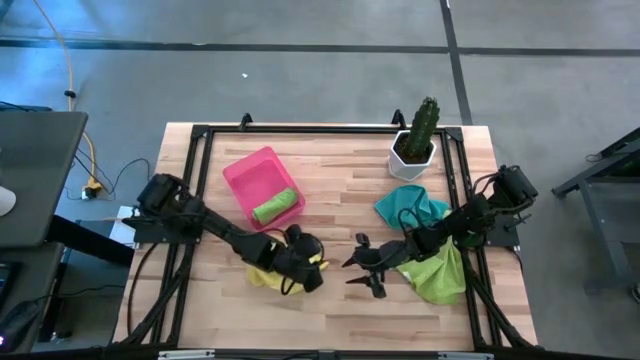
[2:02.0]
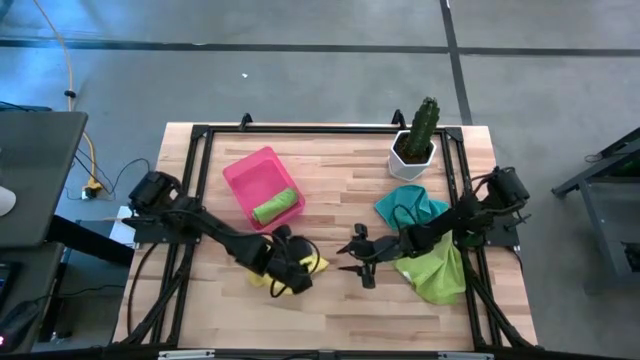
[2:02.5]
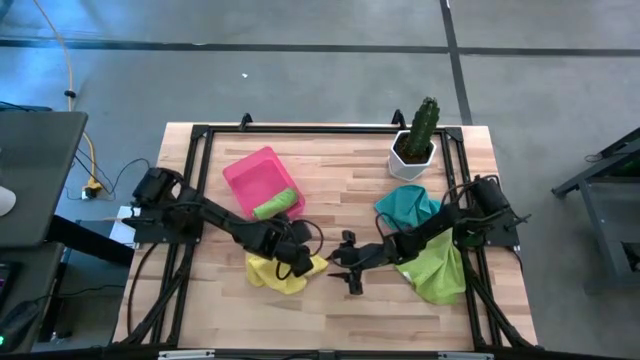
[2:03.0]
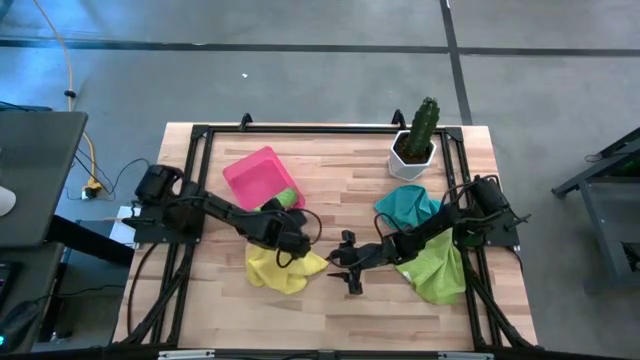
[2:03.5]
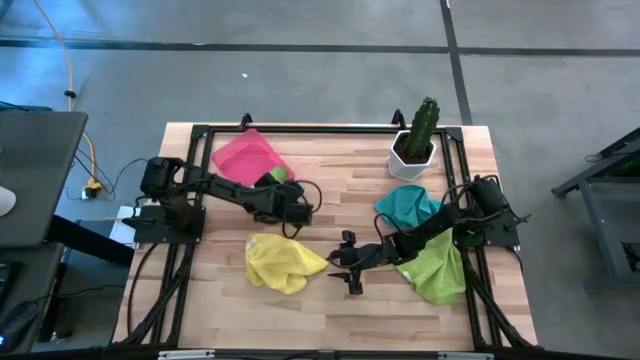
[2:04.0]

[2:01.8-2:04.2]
Task: Roll microfiber towels into tight, uniform cylinder then place into a basket
Adjust the pink bin

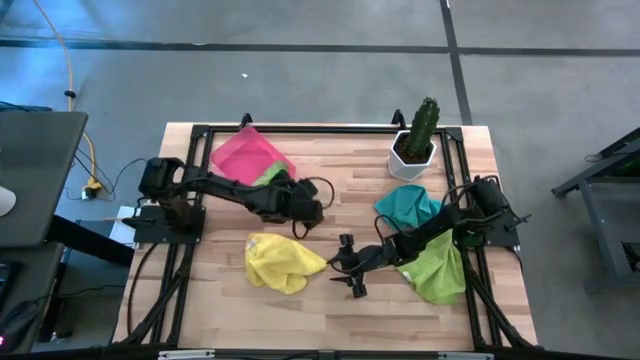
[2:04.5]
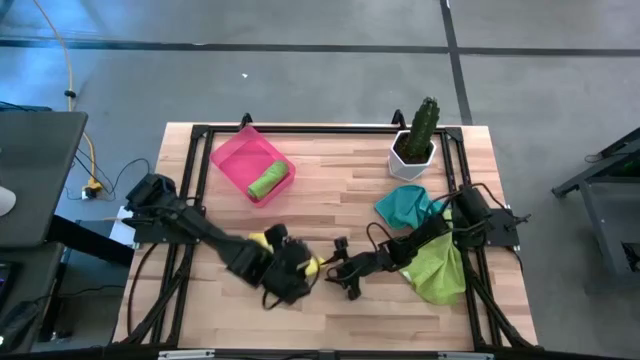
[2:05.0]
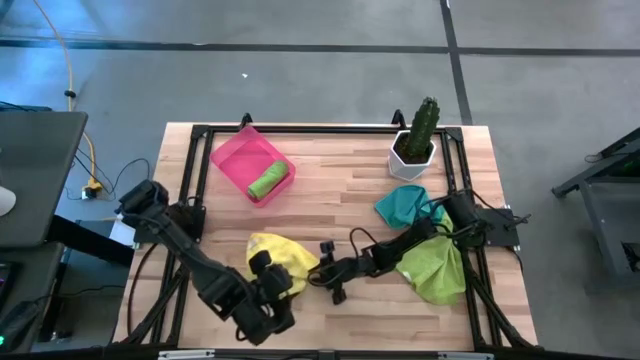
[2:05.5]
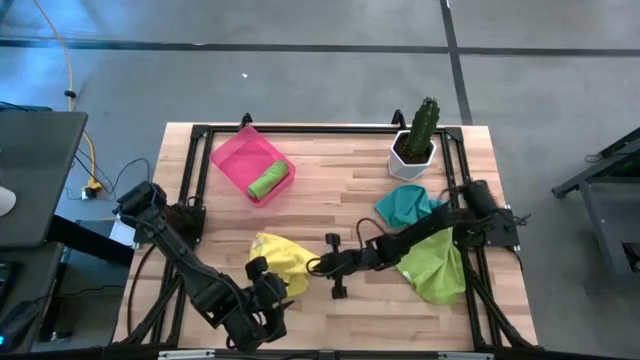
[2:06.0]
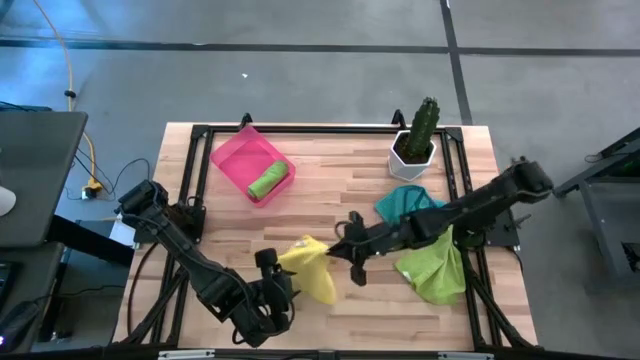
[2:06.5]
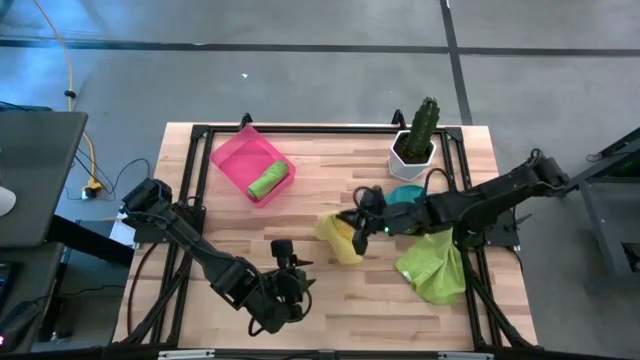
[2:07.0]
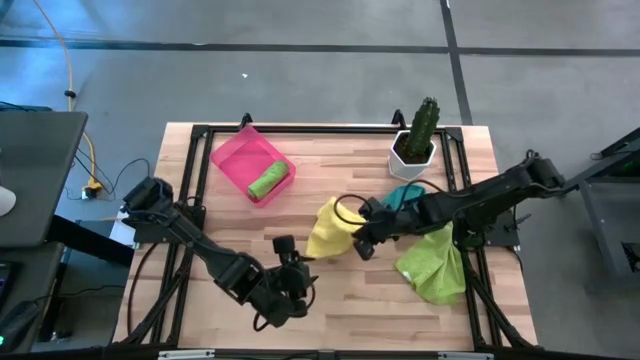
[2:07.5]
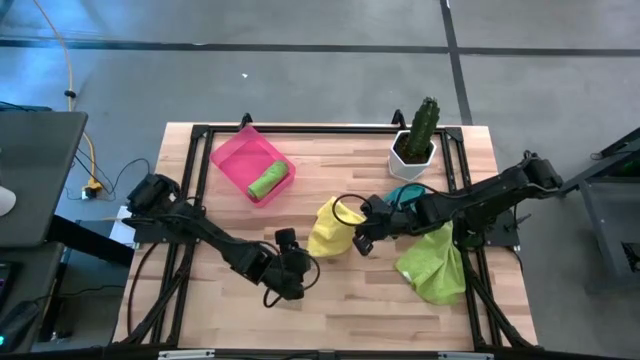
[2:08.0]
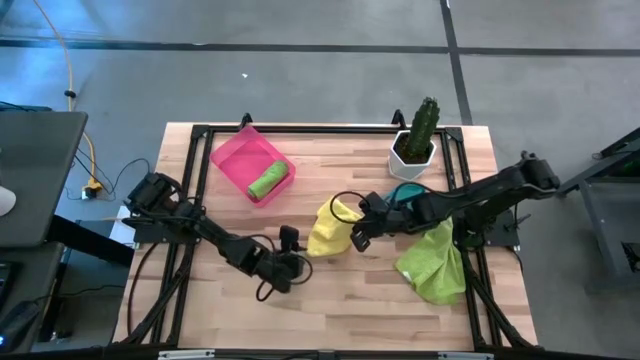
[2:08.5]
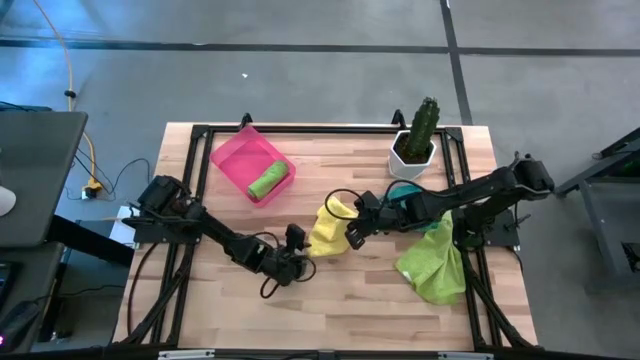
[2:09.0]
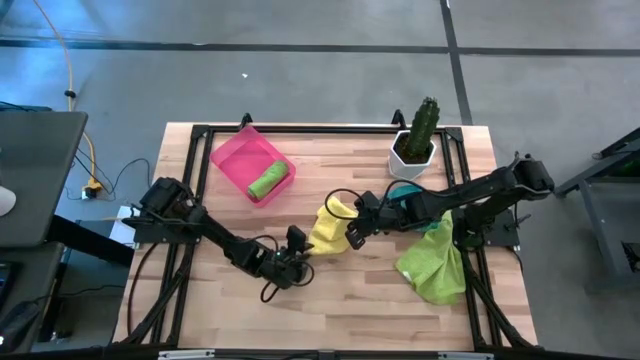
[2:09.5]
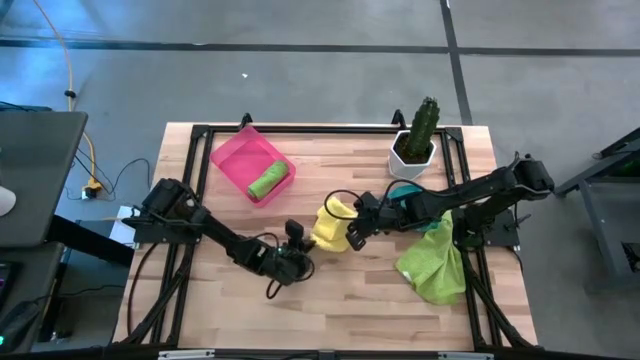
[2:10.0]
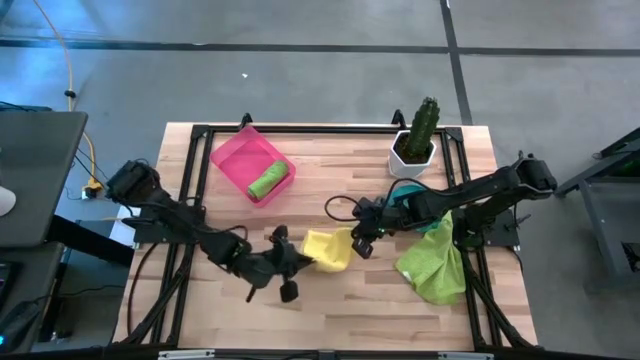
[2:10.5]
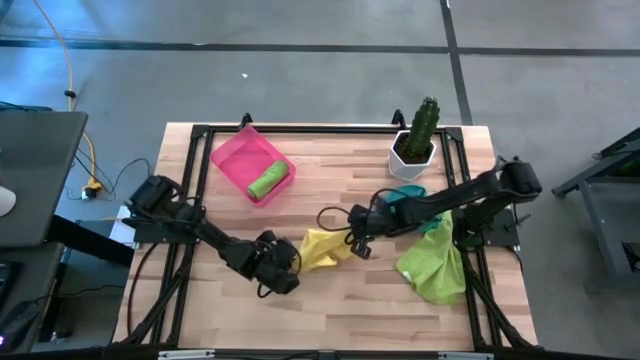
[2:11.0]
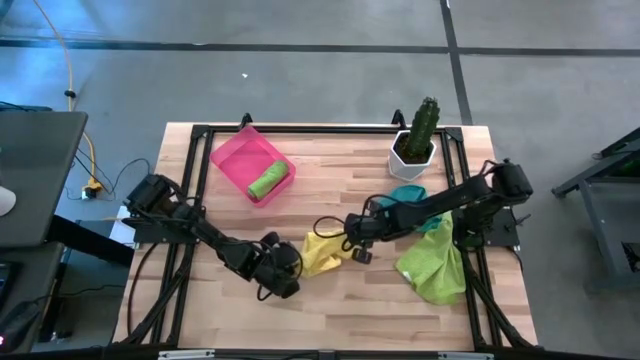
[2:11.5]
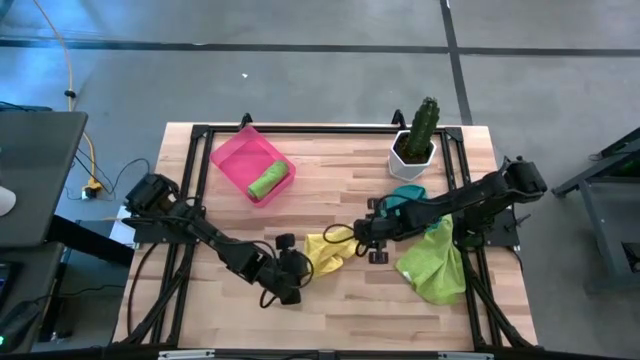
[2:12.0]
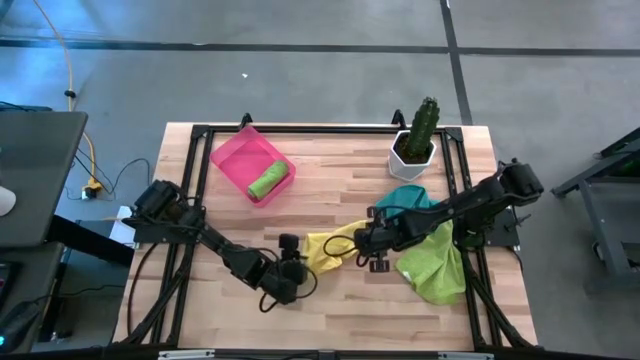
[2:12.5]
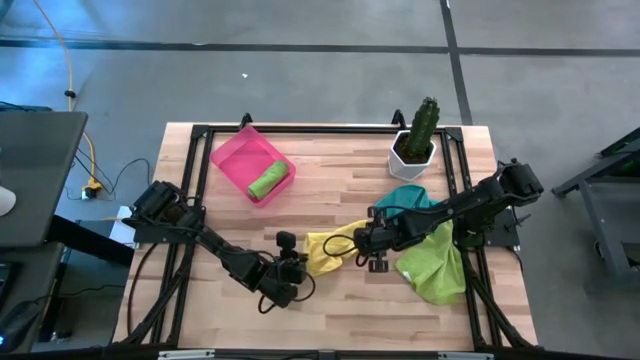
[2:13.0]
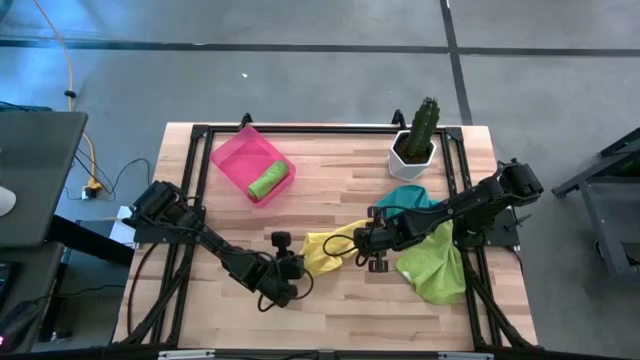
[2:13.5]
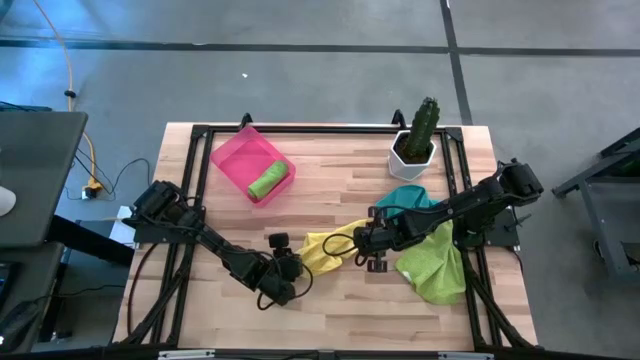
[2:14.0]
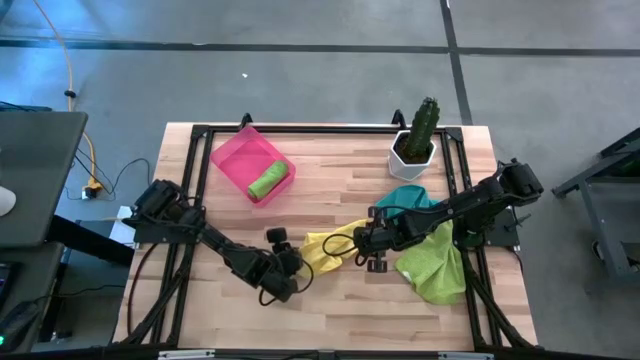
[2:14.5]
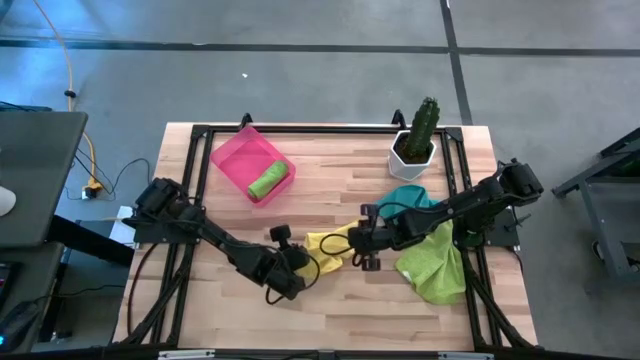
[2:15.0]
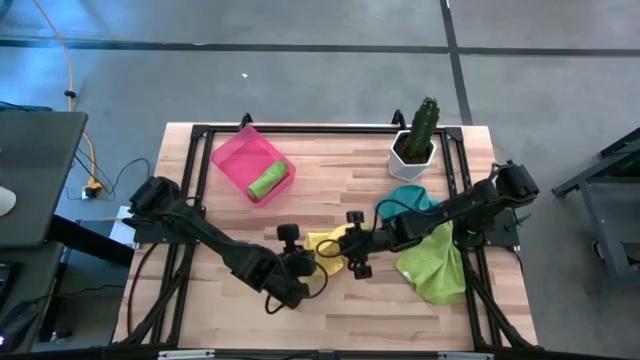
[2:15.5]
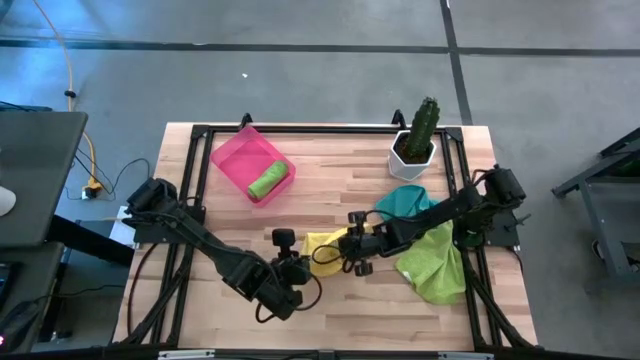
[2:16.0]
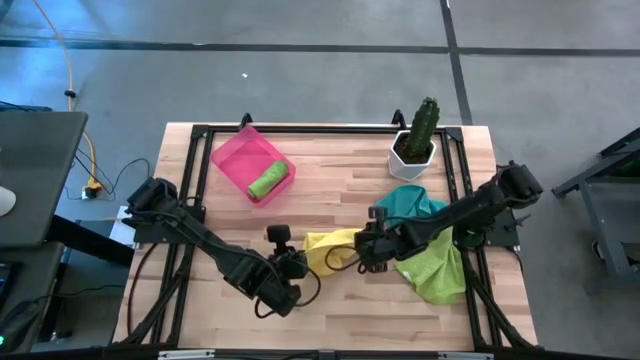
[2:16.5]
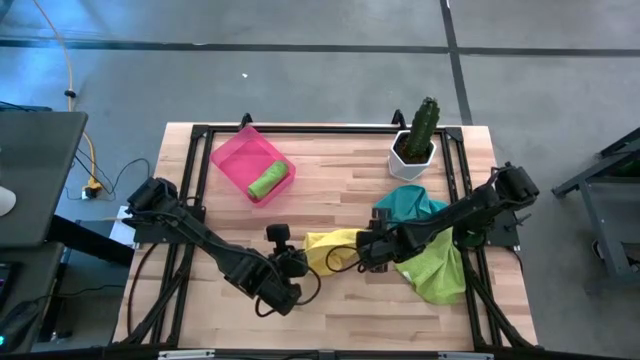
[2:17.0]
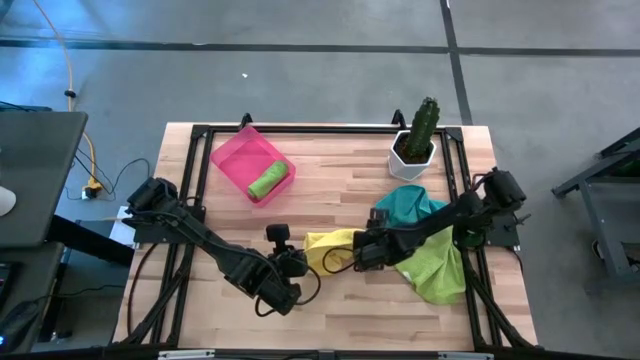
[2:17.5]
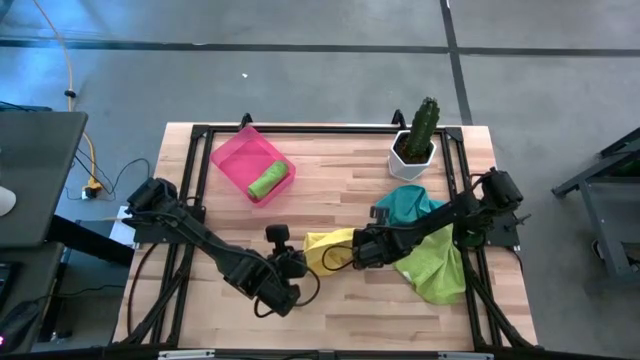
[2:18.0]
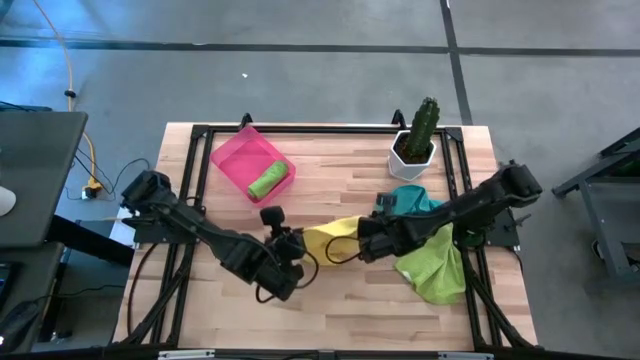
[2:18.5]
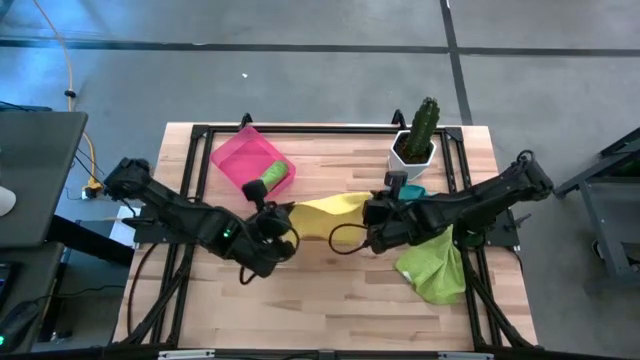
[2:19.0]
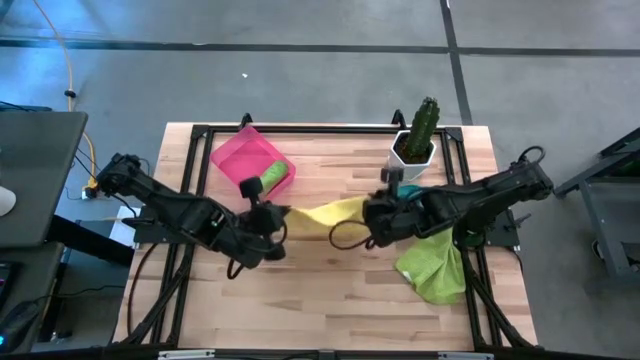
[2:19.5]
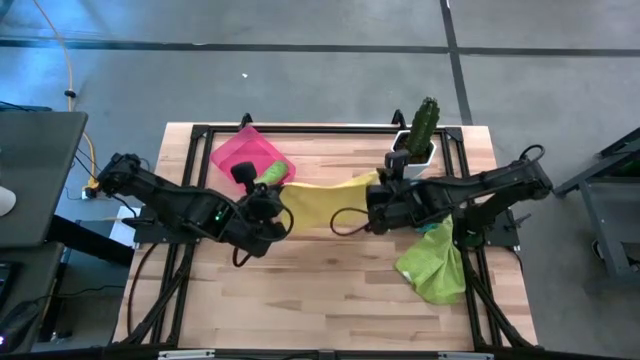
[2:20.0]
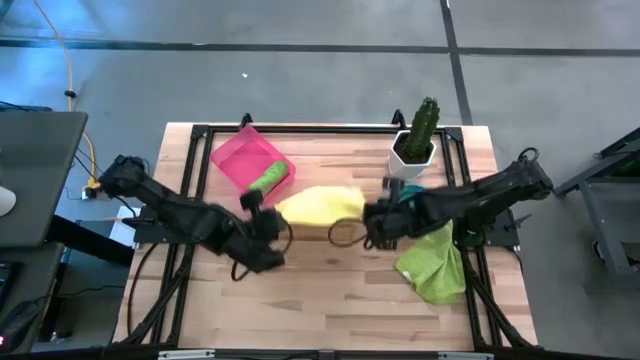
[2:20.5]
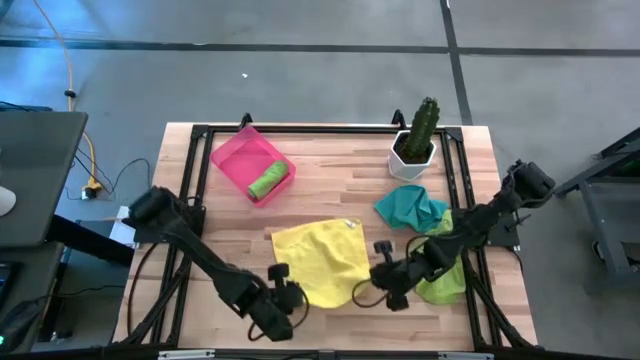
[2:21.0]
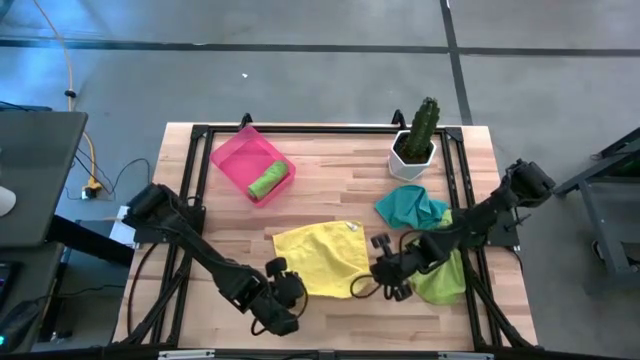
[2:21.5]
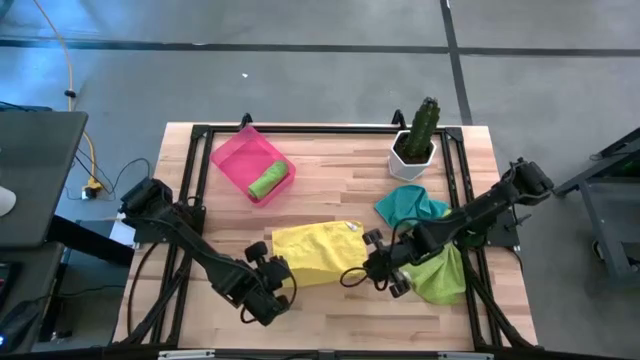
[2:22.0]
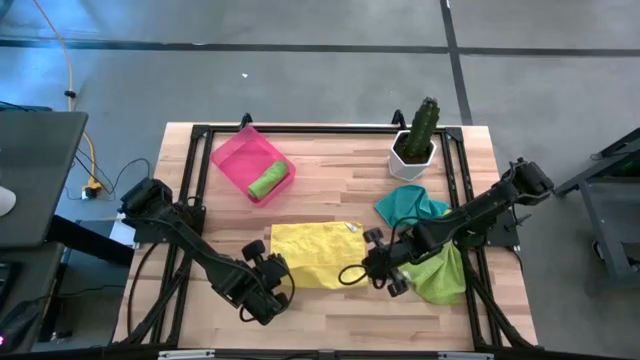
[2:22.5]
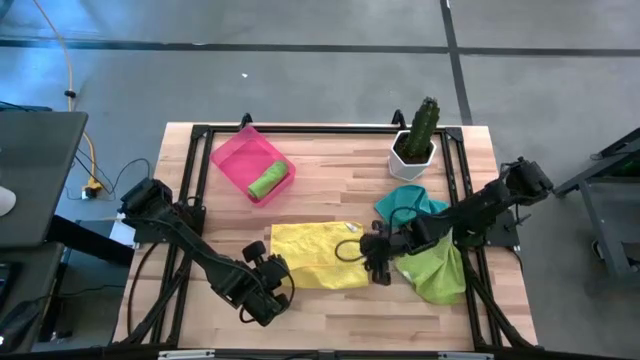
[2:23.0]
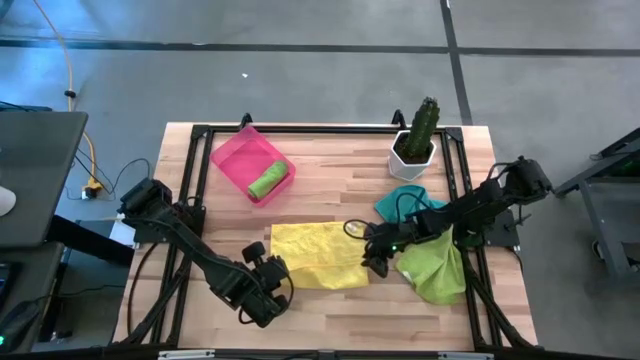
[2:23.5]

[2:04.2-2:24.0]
Roll the yellow microfiber cloth
